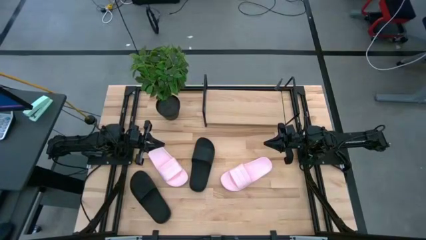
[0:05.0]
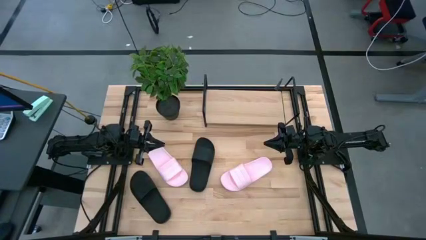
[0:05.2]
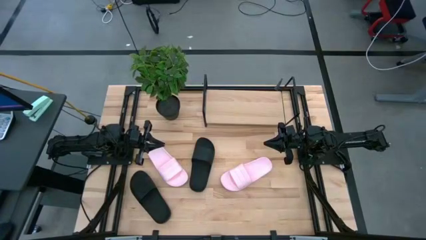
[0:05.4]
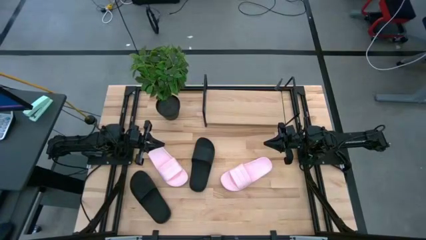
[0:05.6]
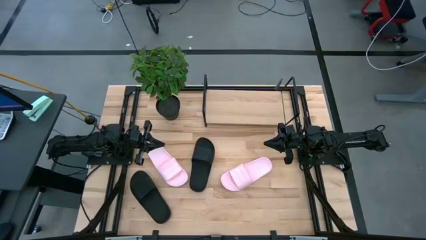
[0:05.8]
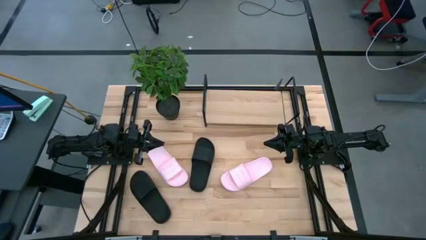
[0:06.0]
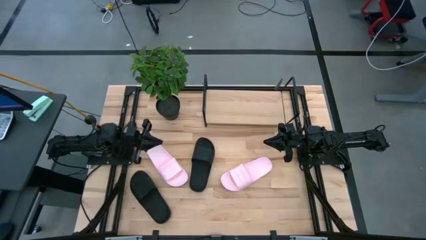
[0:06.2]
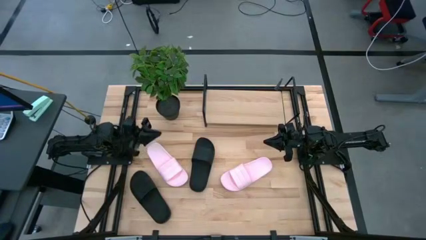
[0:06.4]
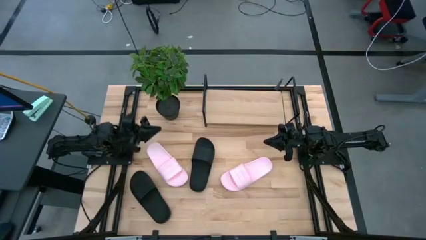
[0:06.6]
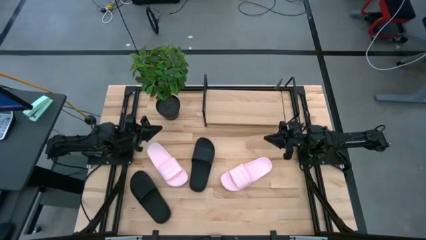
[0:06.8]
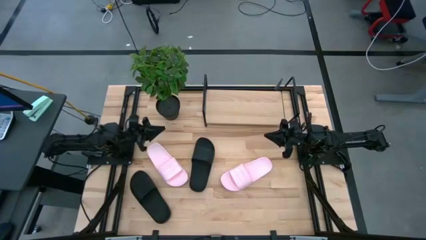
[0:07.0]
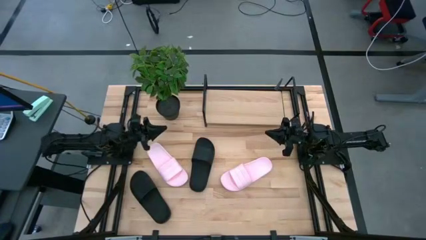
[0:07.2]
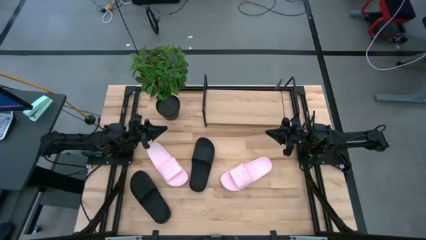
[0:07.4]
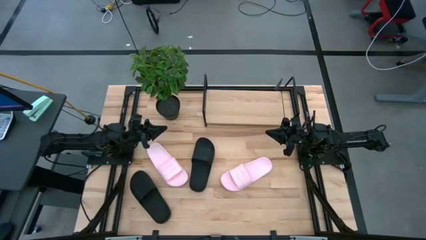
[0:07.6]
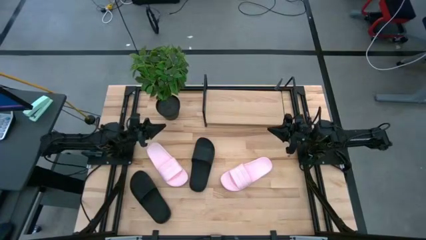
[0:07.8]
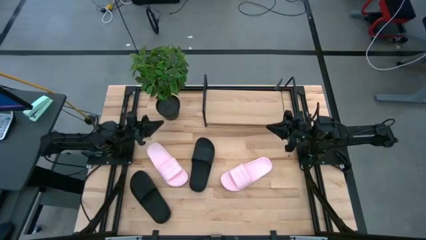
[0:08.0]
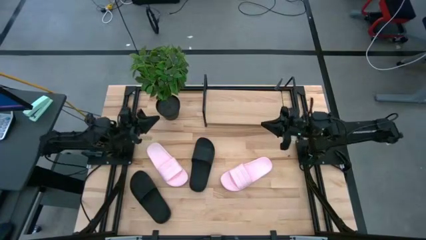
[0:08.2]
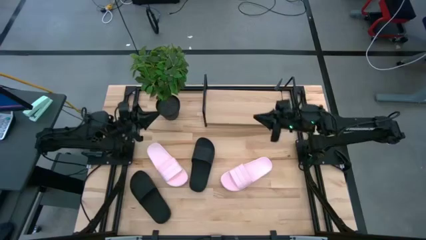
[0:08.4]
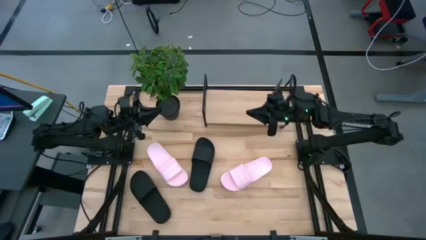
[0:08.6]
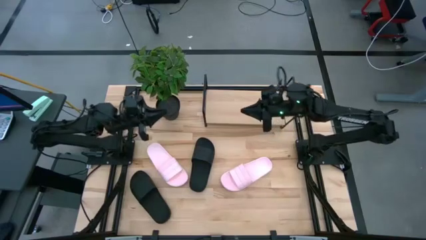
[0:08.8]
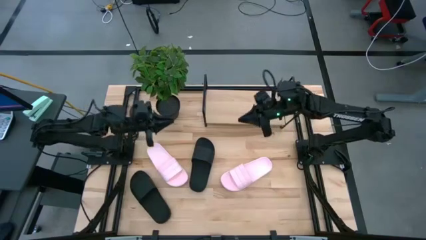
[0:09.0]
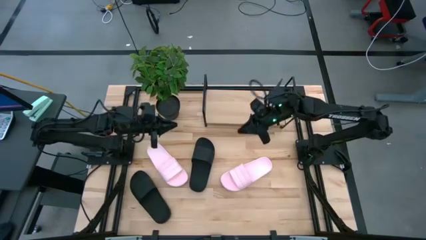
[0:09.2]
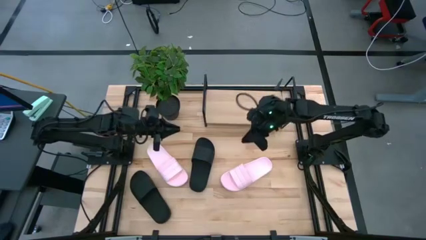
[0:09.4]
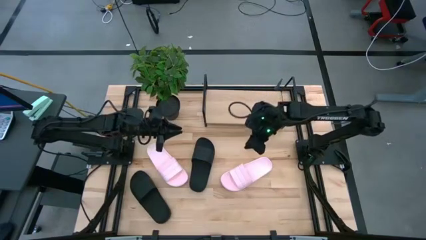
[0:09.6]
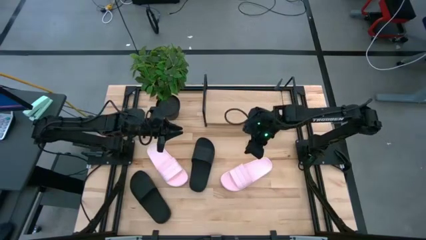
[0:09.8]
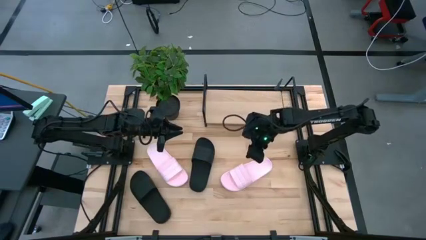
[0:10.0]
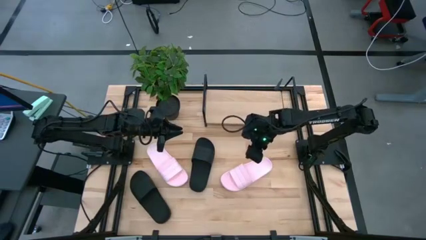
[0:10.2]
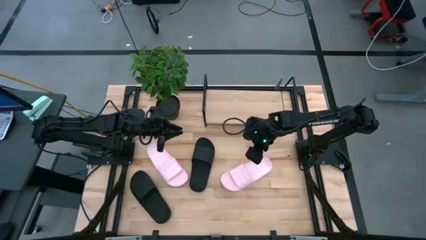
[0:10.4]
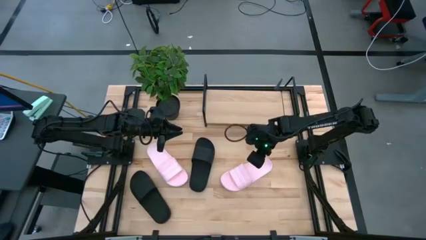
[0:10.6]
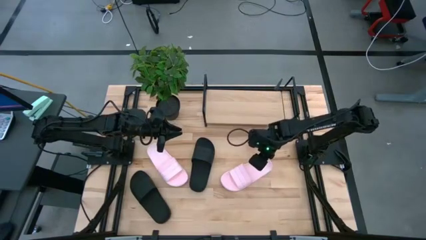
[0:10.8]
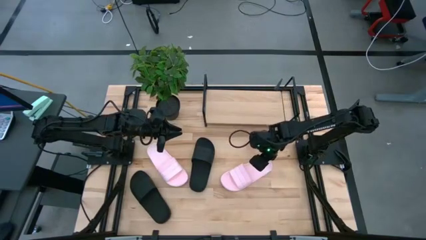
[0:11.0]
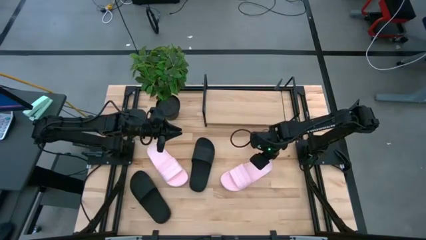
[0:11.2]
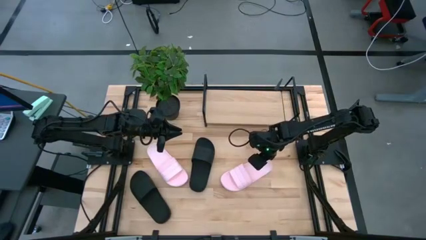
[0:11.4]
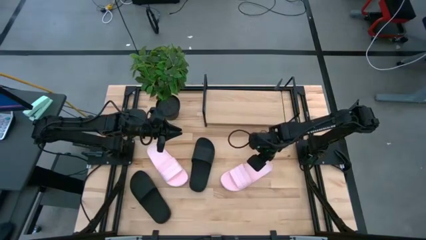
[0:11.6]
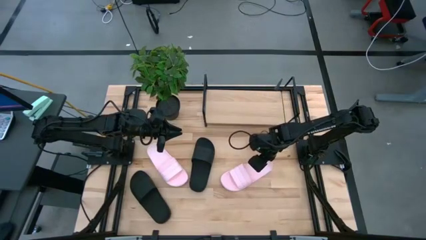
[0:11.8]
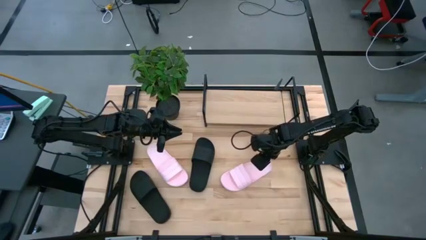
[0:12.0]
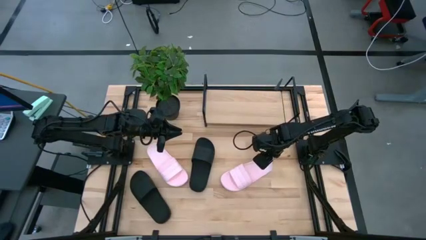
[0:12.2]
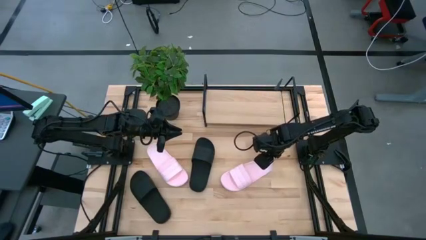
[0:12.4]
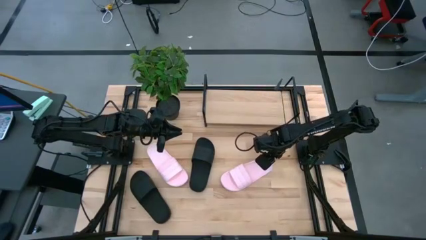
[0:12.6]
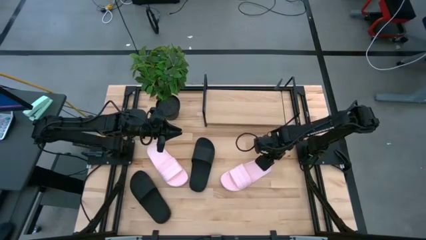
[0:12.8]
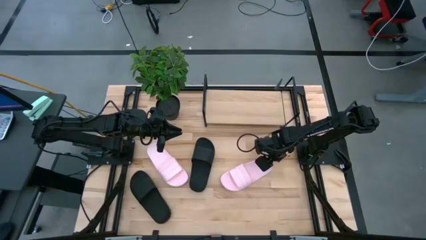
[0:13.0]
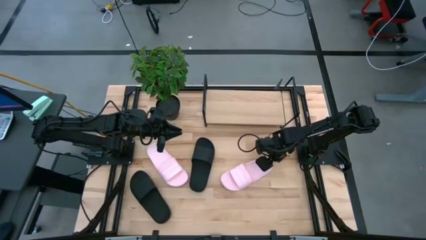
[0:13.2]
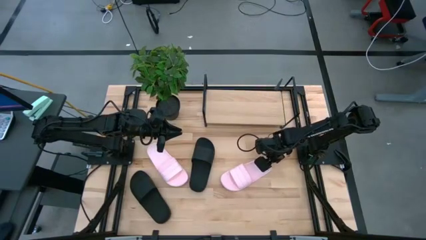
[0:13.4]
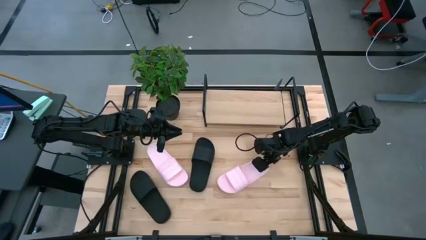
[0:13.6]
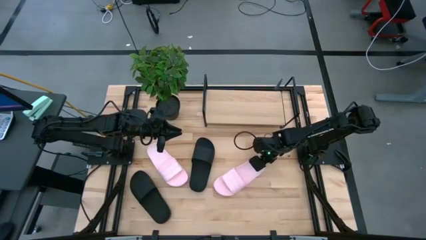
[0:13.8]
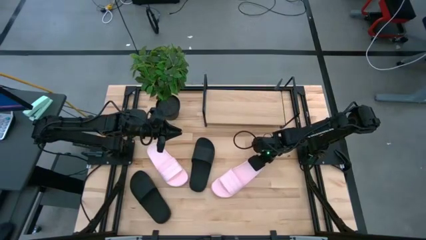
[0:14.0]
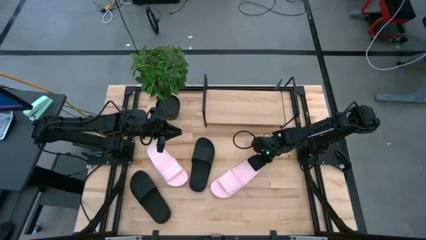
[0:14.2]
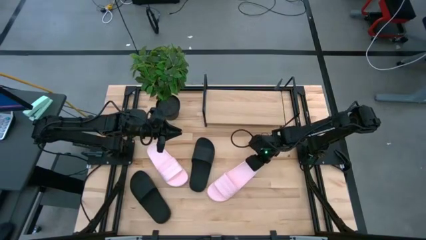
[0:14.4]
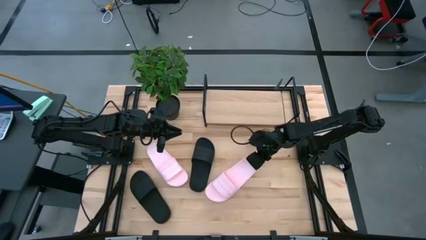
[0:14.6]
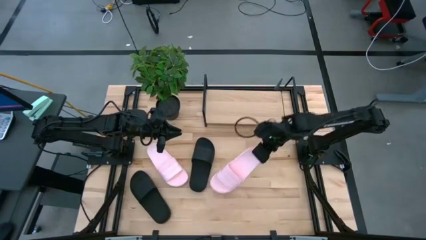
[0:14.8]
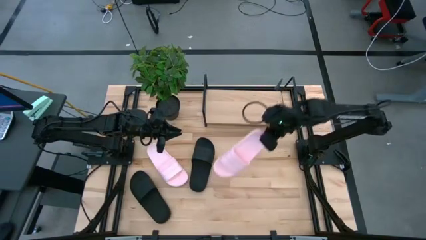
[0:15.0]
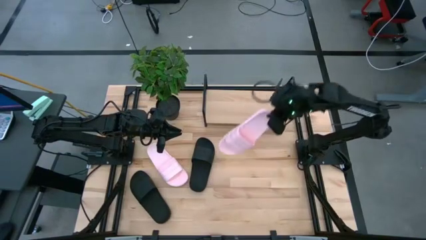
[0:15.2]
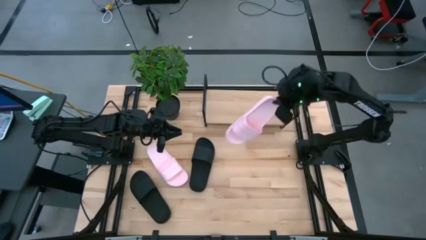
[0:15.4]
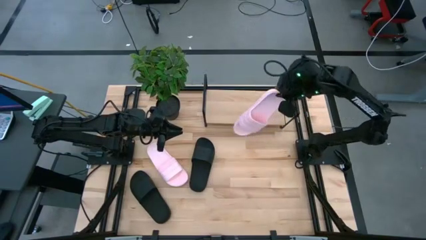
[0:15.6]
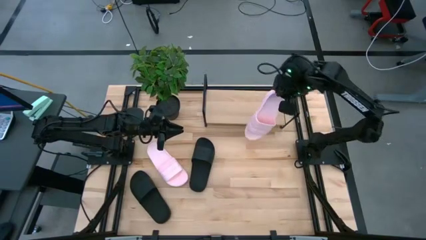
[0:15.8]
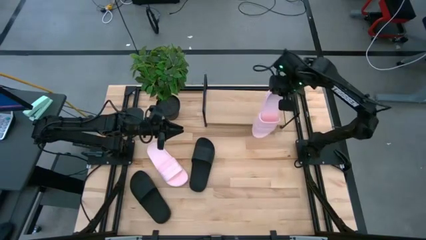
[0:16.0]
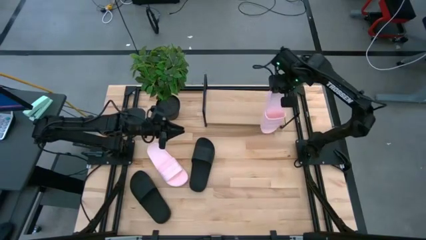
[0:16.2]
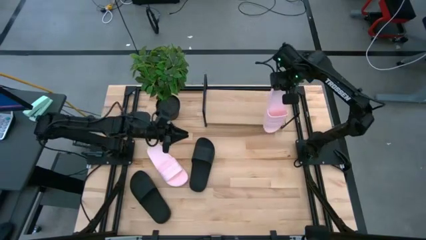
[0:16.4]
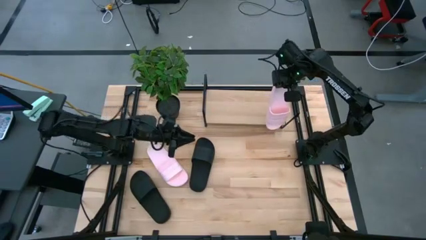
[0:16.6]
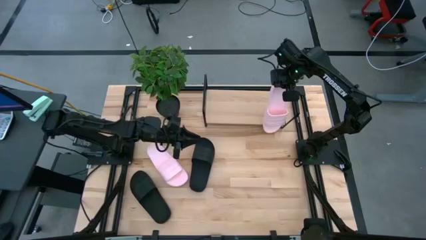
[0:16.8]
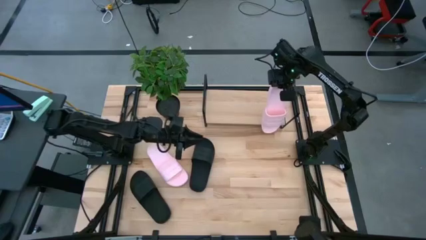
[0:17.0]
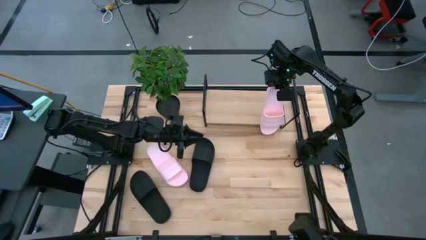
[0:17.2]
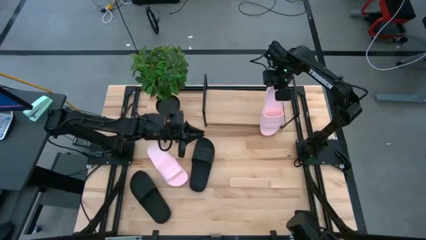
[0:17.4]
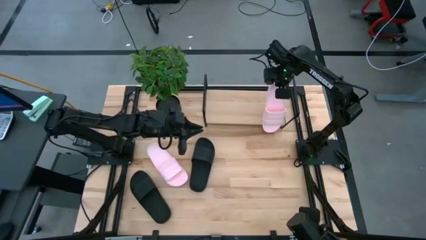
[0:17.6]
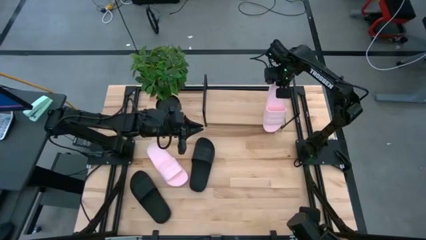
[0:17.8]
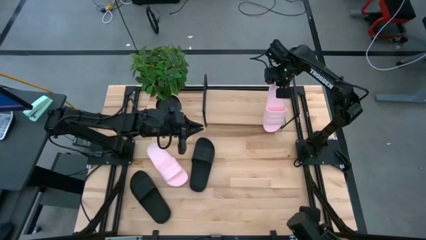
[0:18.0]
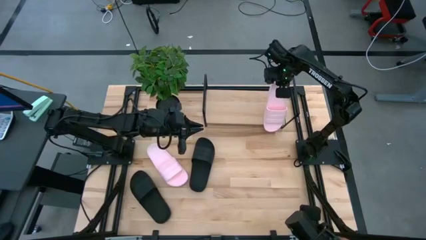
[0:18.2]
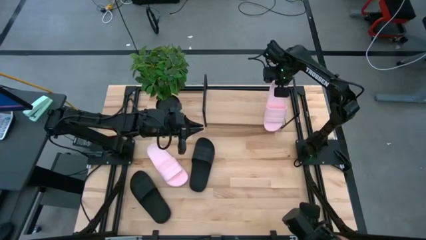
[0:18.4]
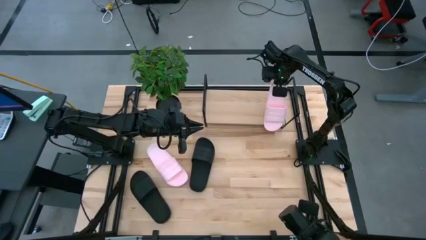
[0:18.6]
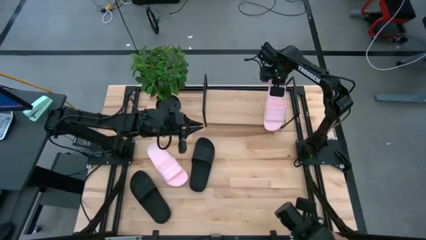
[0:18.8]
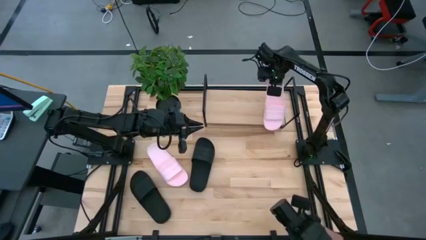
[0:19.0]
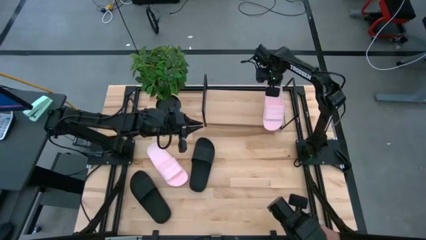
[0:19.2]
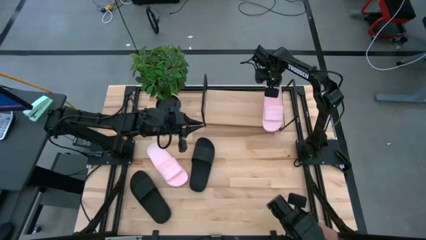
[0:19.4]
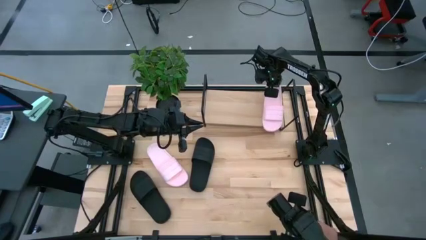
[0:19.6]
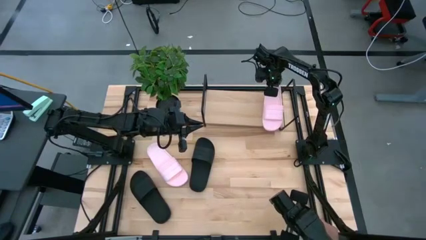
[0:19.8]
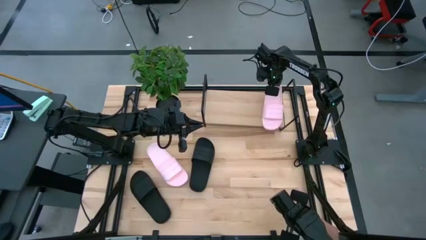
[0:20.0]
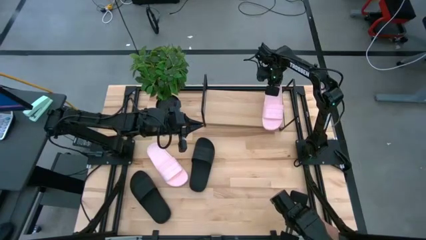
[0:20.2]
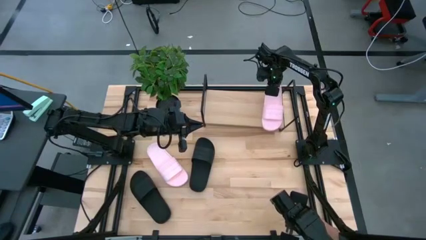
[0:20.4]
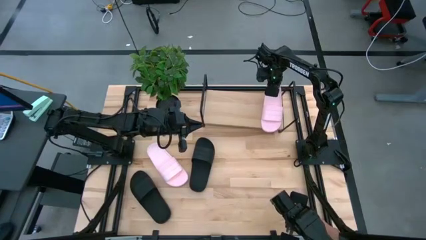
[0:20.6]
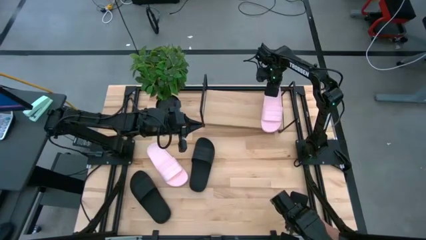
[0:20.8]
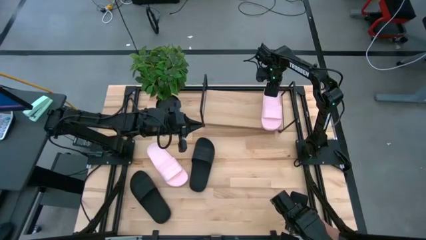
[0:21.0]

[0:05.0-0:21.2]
Task: Pick and place slides into the shelf
Put the right pink slide on the shelf
